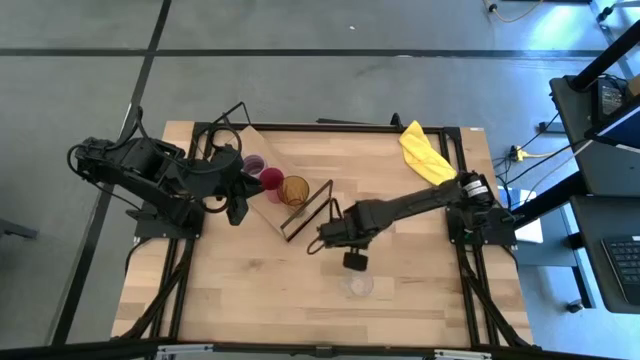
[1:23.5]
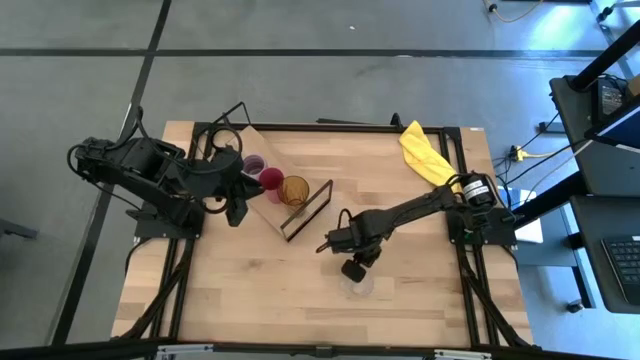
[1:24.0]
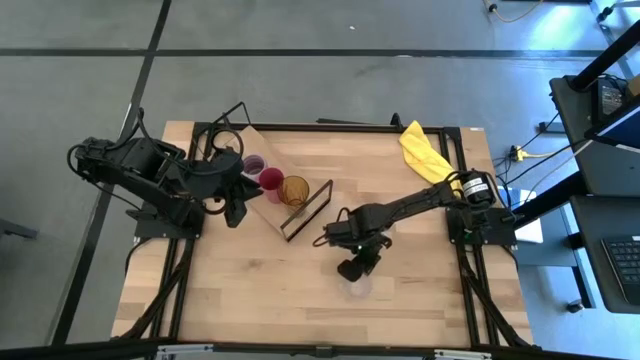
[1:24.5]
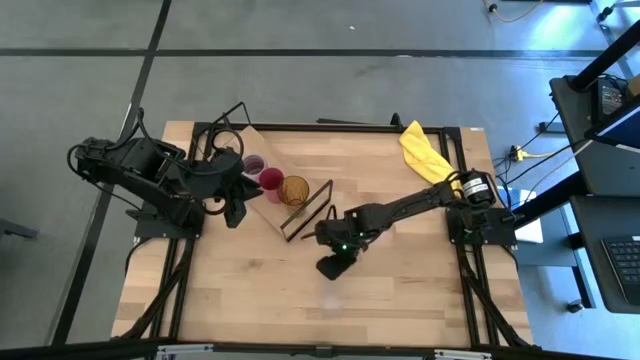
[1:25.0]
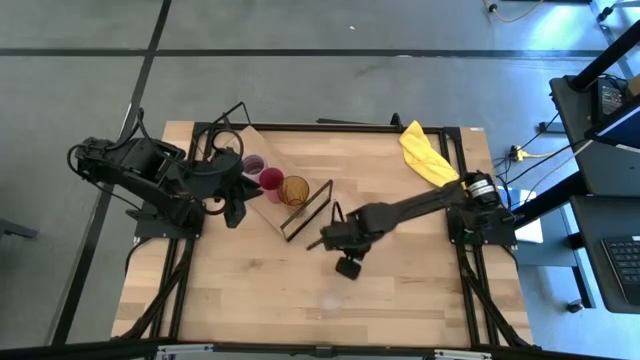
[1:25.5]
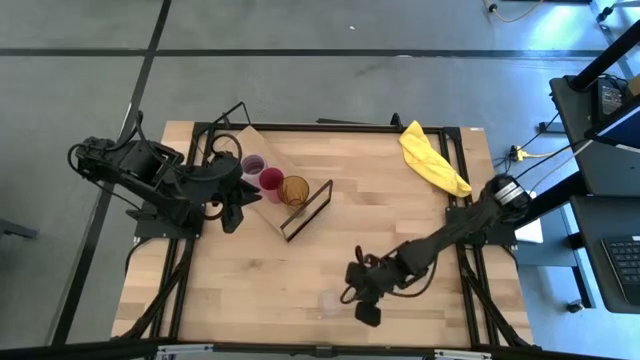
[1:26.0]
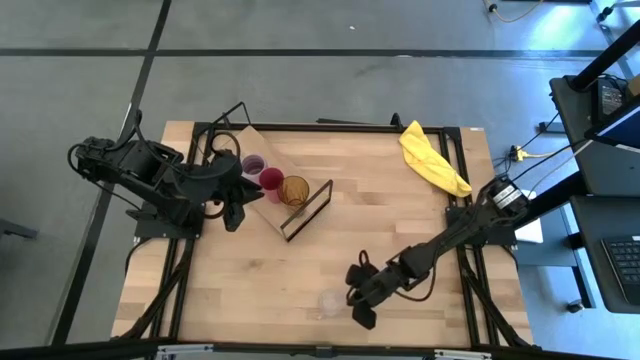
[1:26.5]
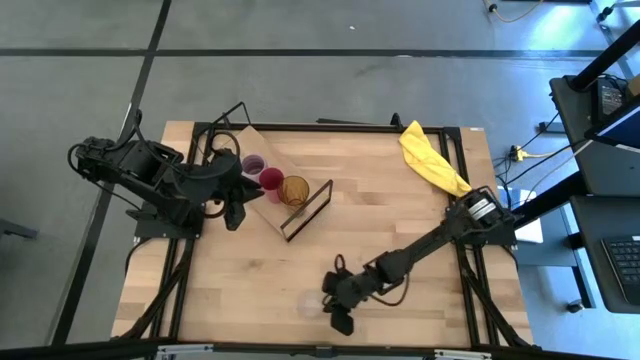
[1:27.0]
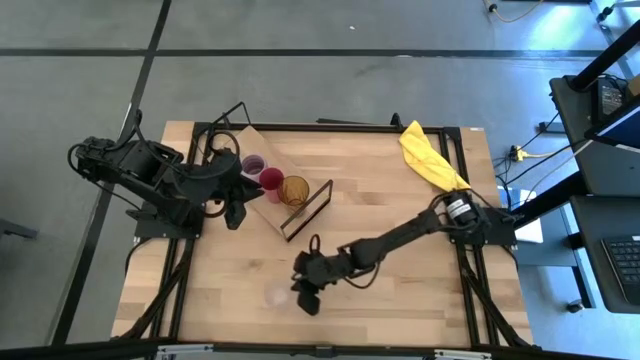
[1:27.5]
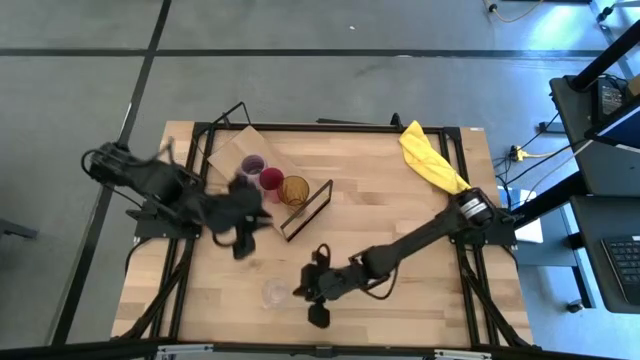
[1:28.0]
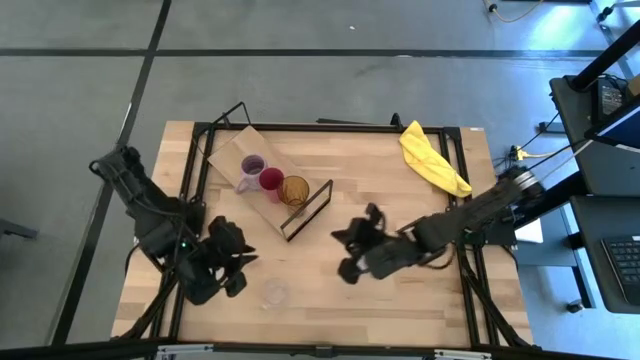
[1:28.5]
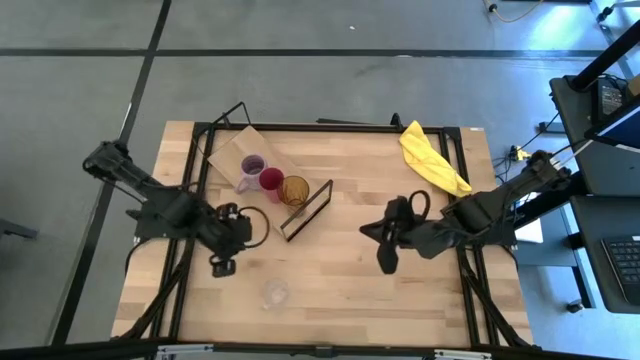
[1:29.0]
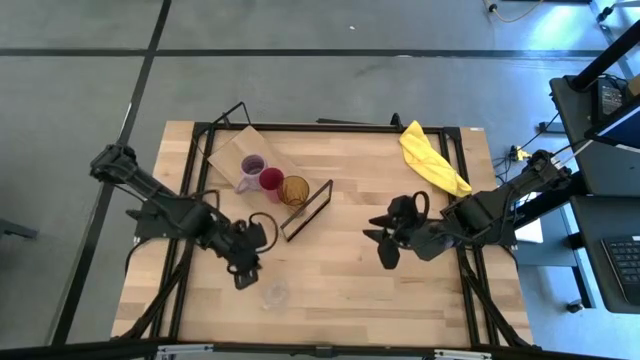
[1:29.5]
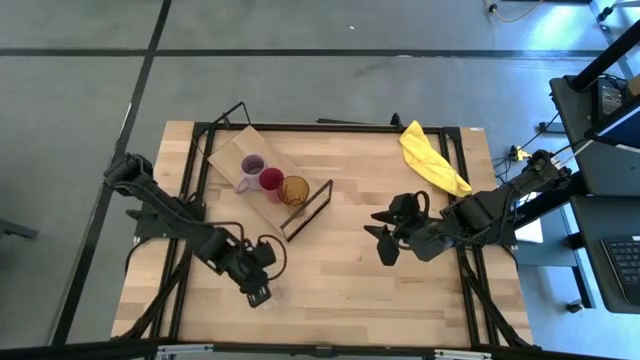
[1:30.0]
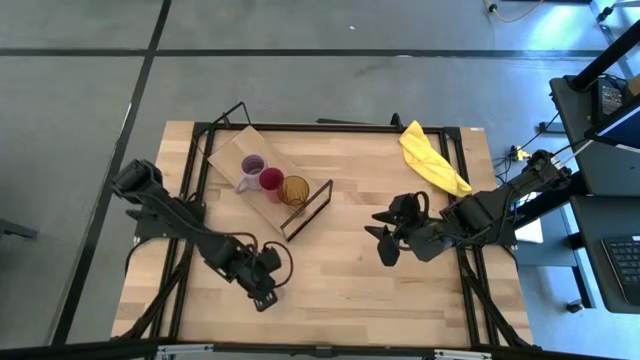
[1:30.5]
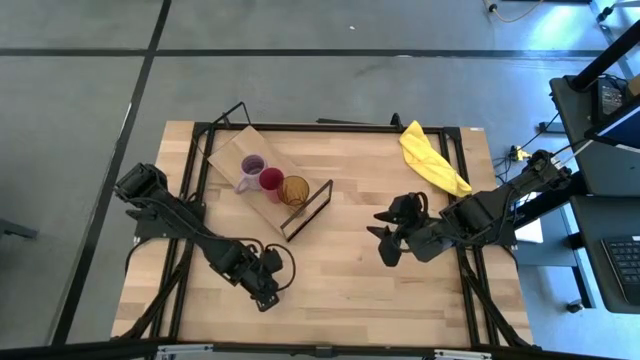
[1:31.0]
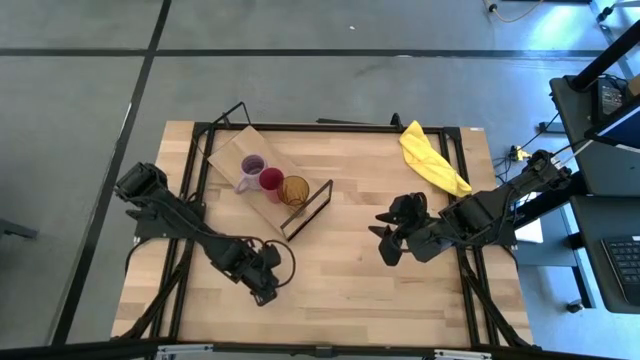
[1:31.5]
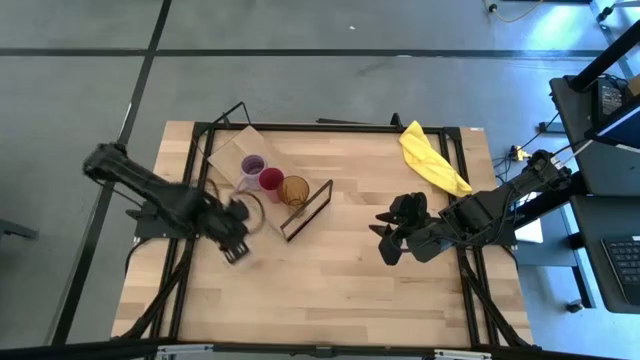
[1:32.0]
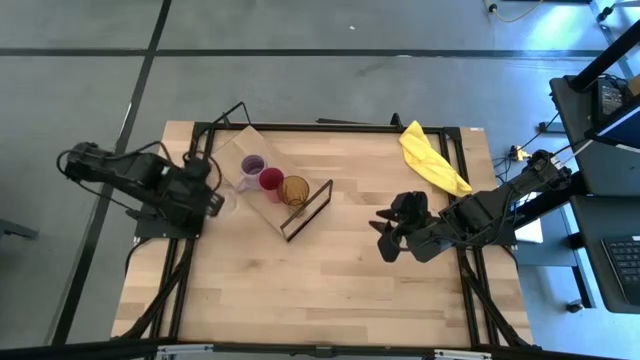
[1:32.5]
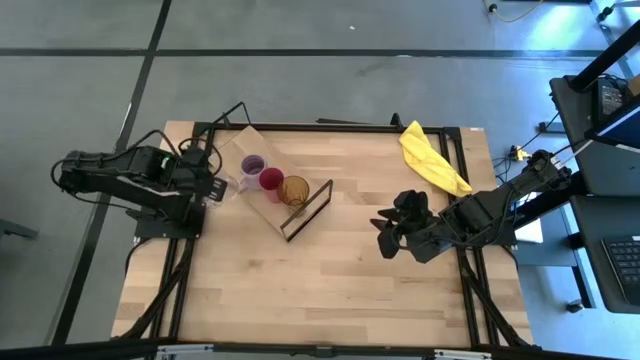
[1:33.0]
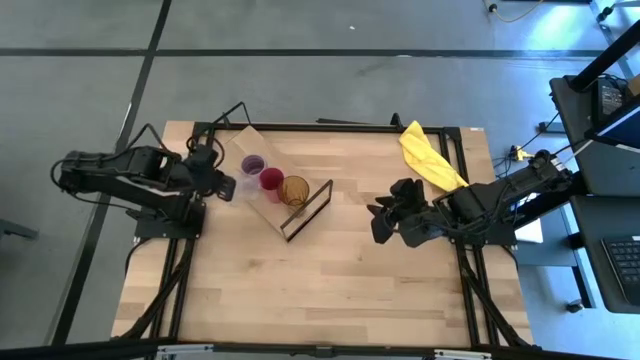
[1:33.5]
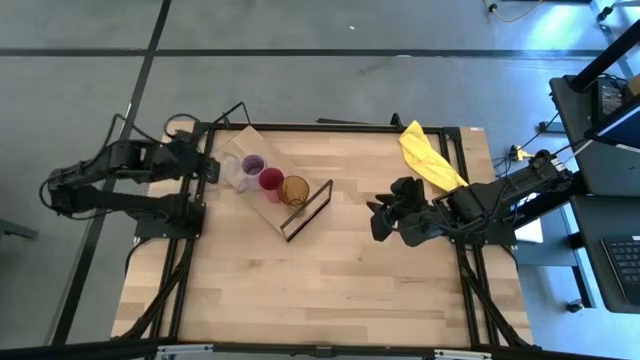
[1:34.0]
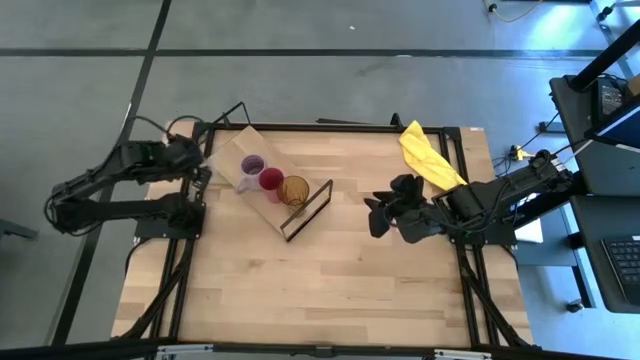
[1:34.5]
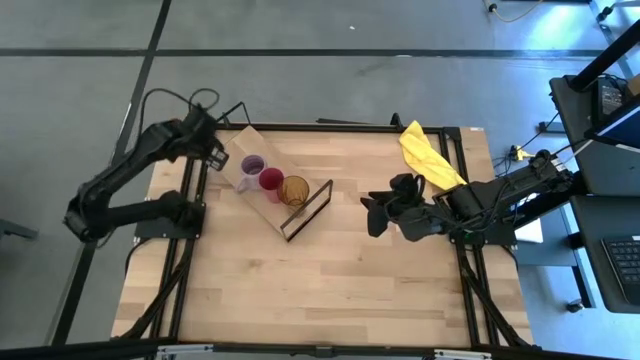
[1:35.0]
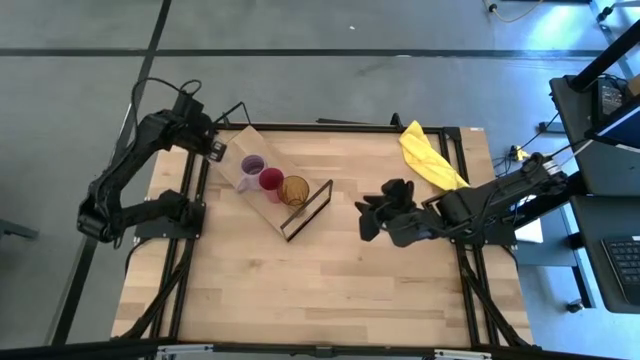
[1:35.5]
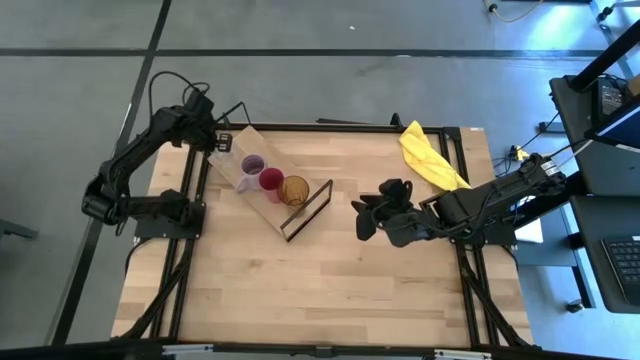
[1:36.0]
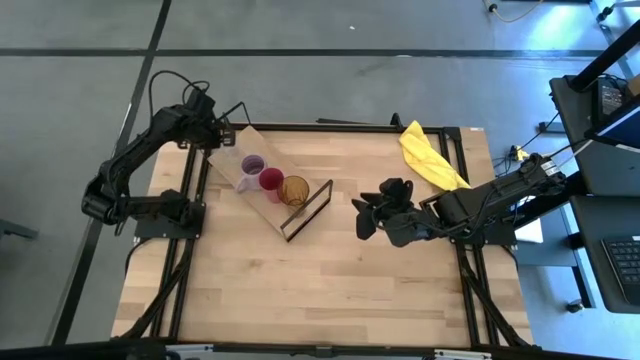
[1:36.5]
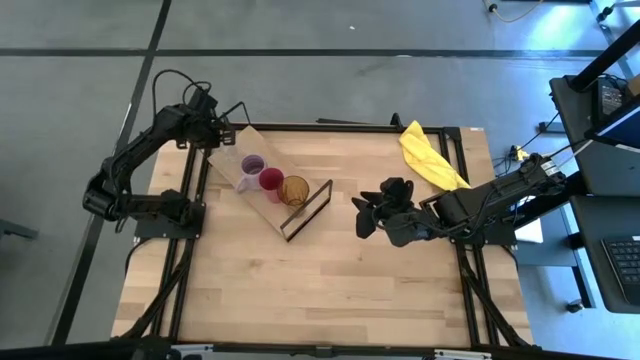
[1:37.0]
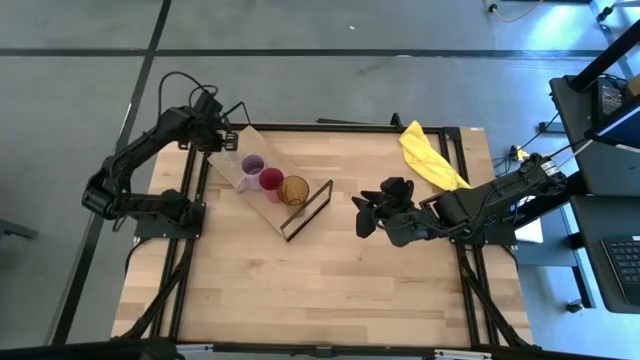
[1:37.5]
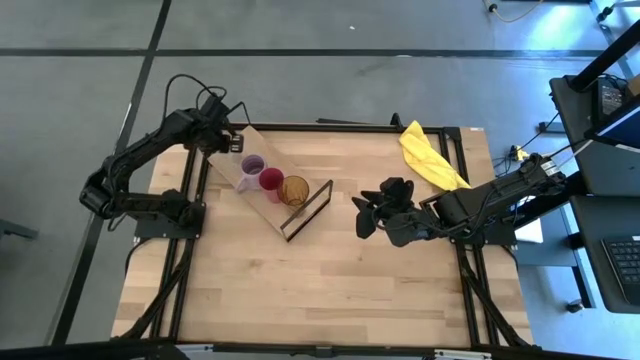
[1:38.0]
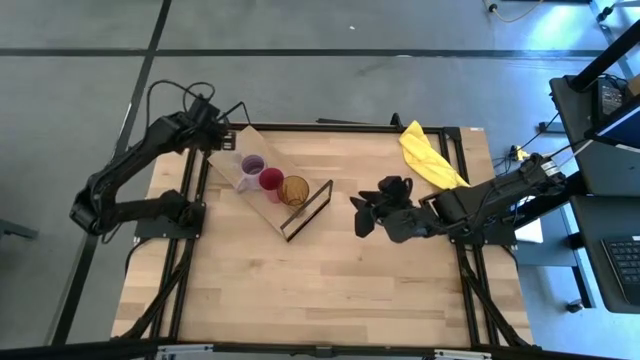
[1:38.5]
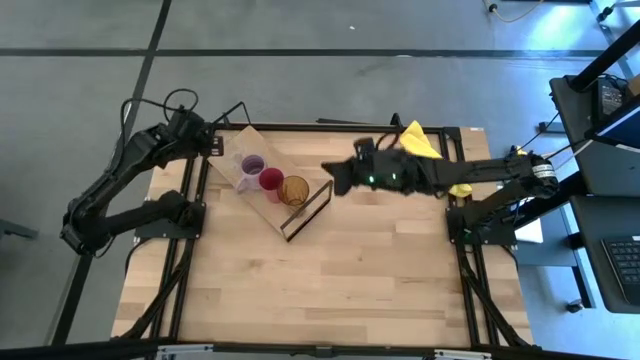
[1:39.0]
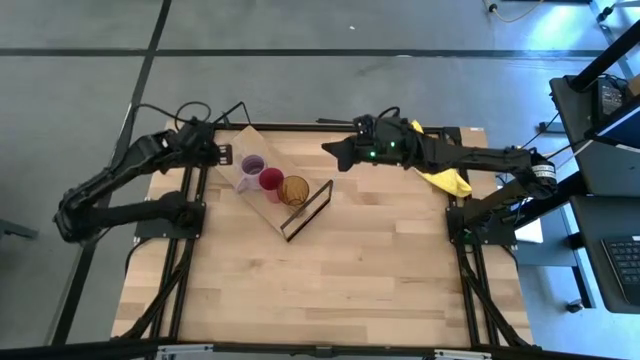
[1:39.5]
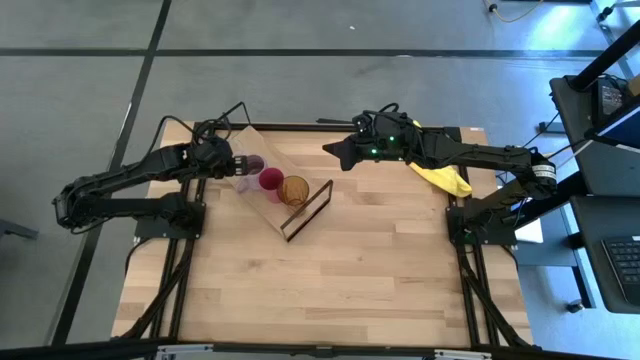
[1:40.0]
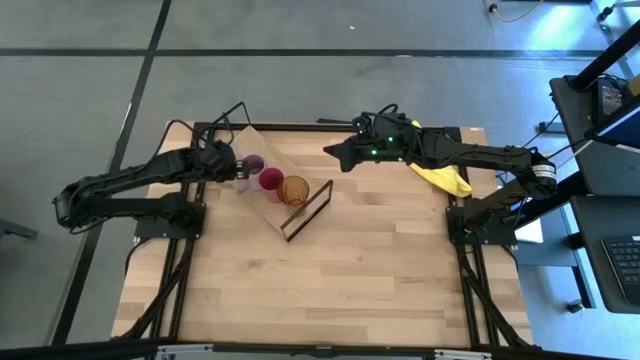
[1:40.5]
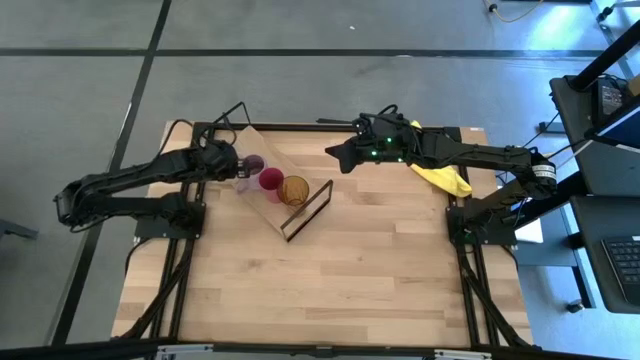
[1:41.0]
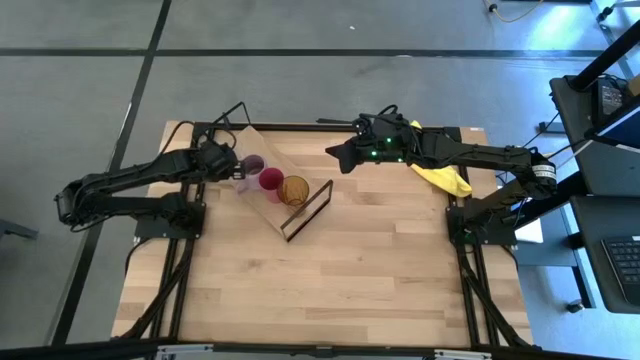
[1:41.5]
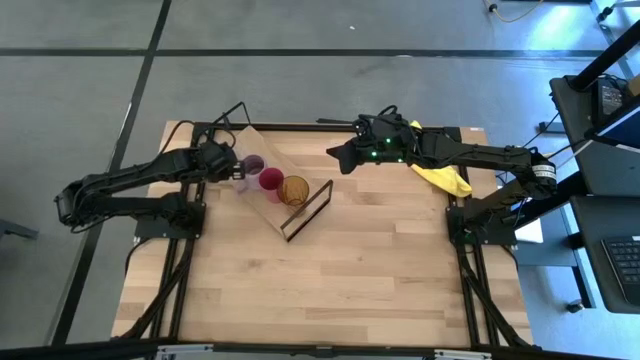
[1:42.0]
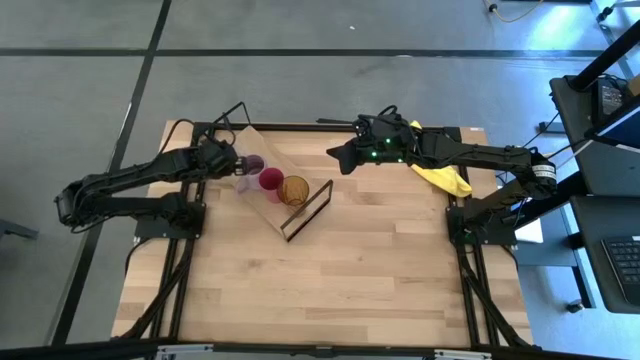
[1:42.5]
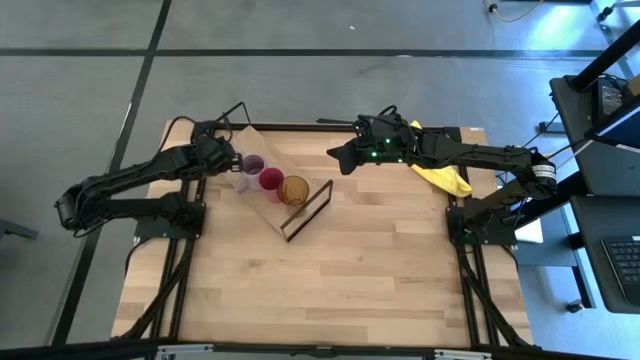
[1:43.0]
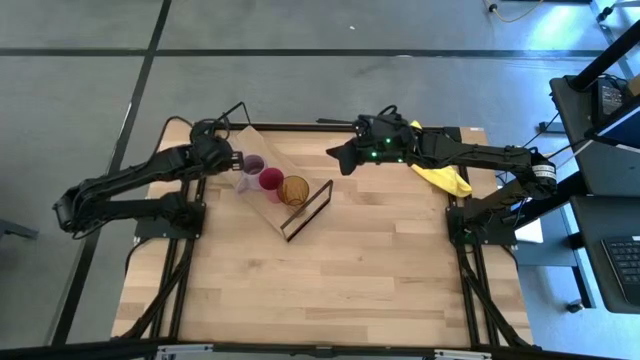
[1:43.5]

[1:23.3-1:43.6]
Task: Stack small to large cups/mugs on shelf
Put the transparent cup on the shelf

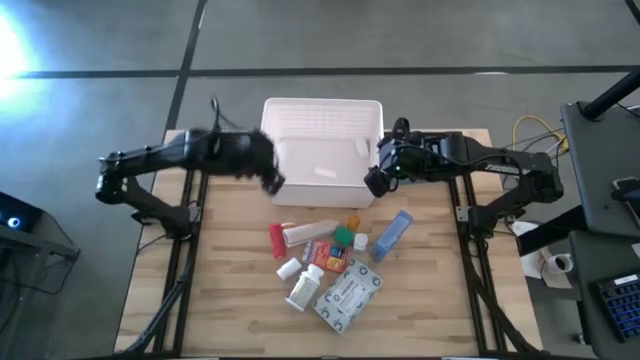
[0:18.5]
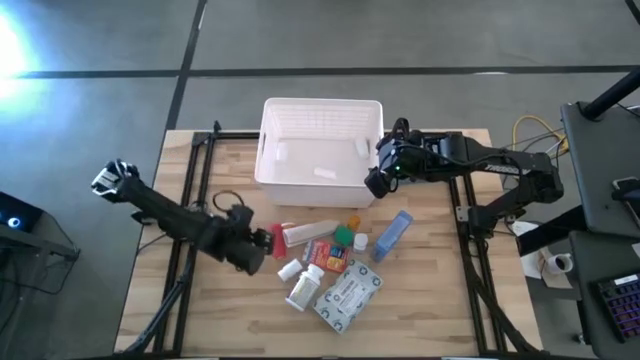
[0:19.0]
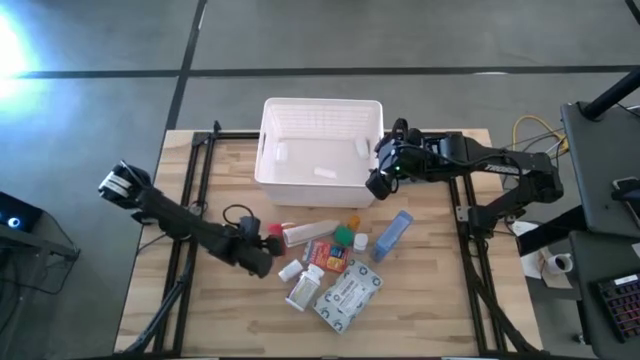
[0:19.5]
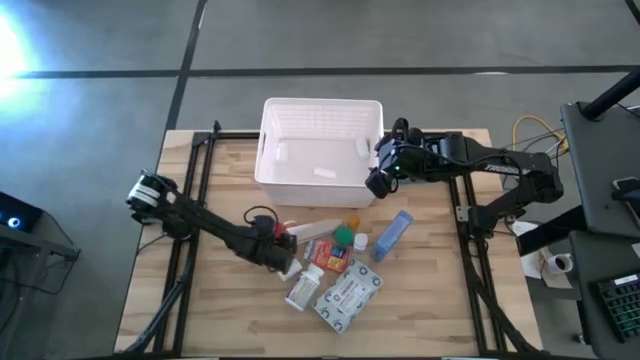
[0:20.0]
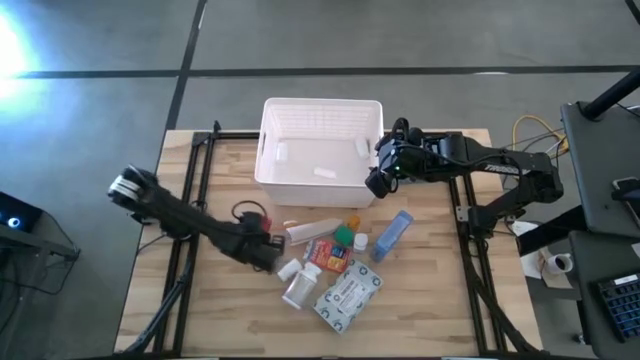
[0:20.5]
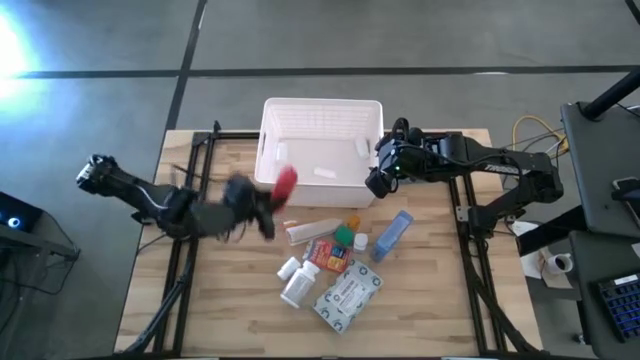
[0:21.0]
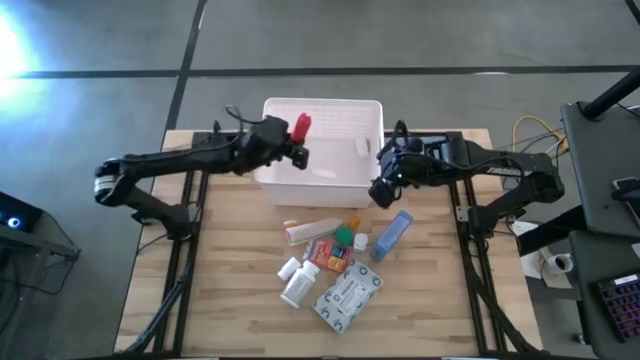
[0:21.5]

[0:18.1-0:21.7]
Task: Pick & place medical supplies in basket/bin
Put the red bandage into the white bin
